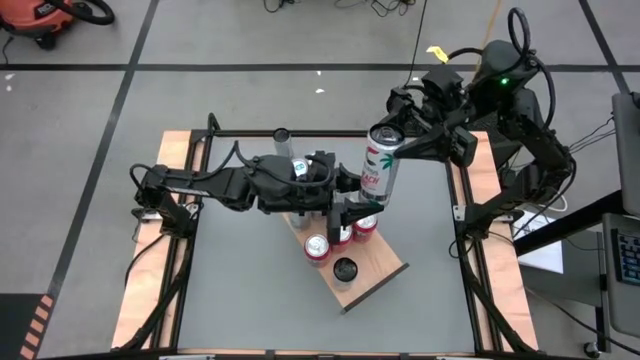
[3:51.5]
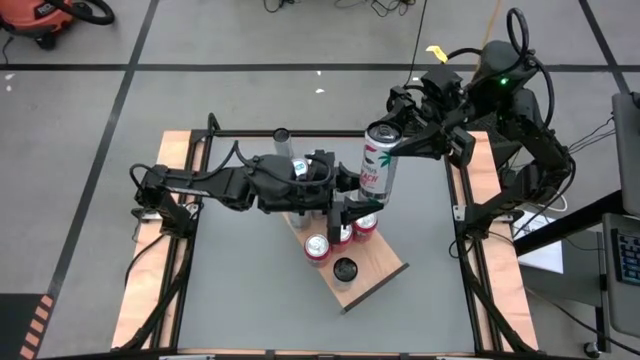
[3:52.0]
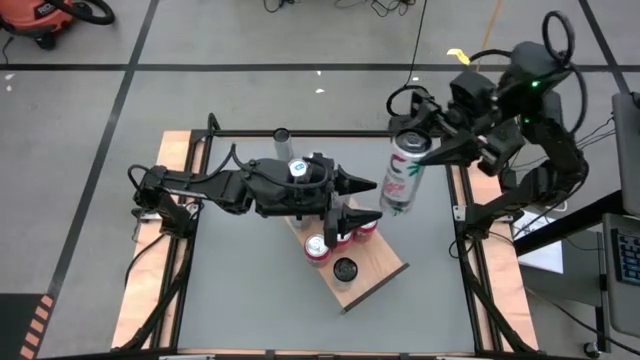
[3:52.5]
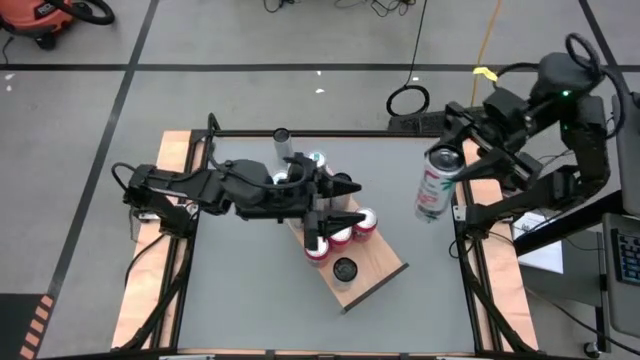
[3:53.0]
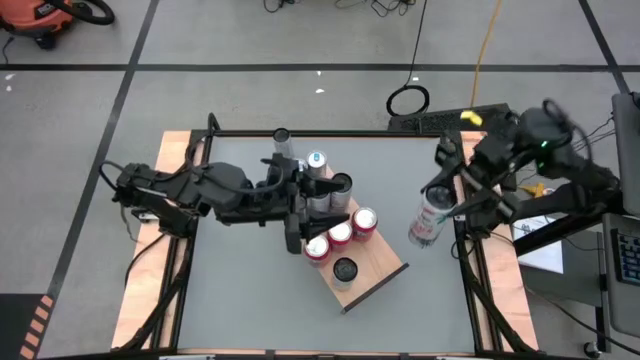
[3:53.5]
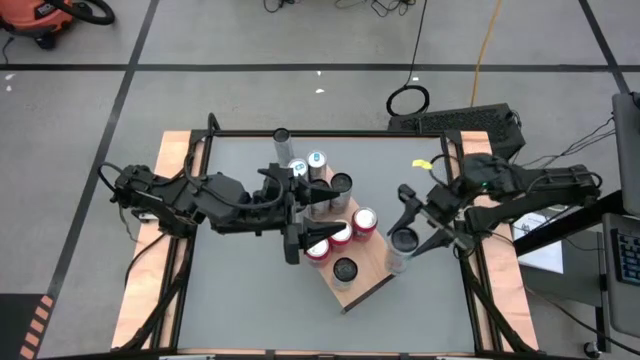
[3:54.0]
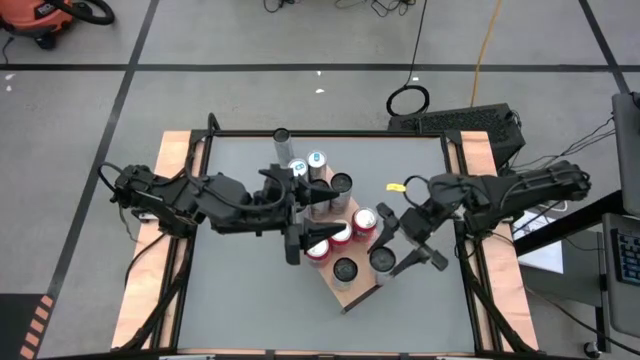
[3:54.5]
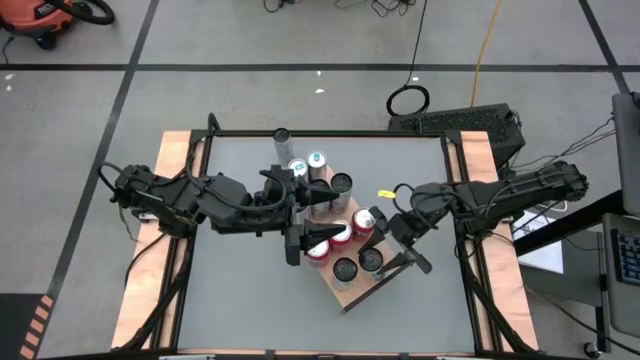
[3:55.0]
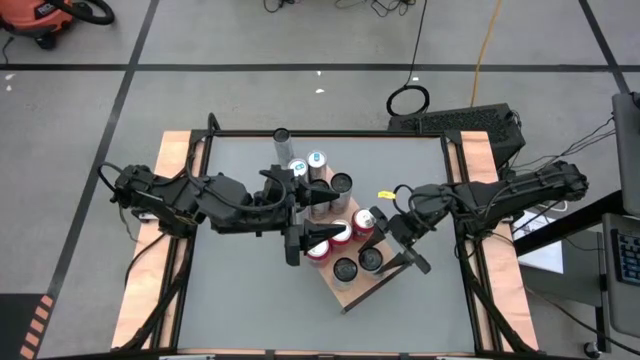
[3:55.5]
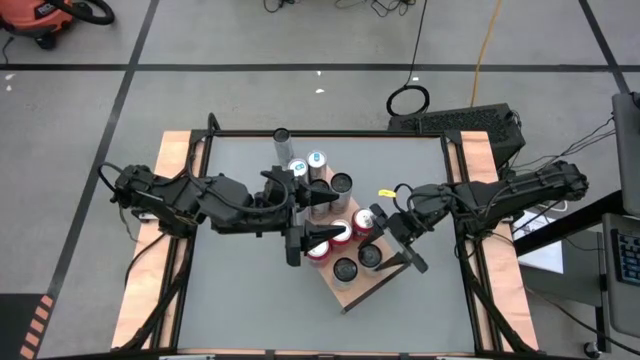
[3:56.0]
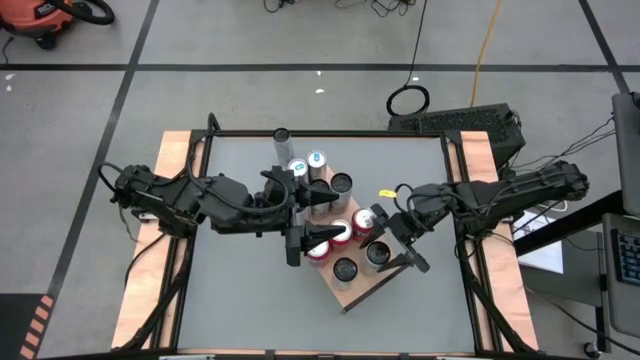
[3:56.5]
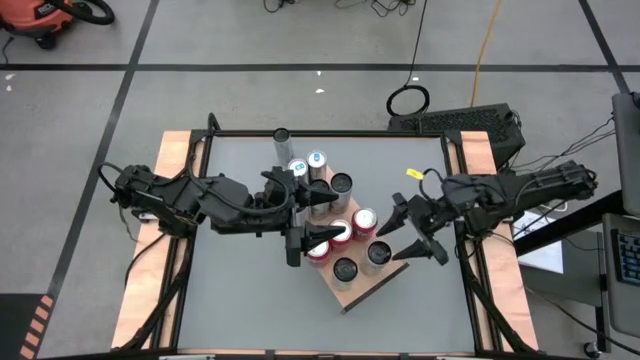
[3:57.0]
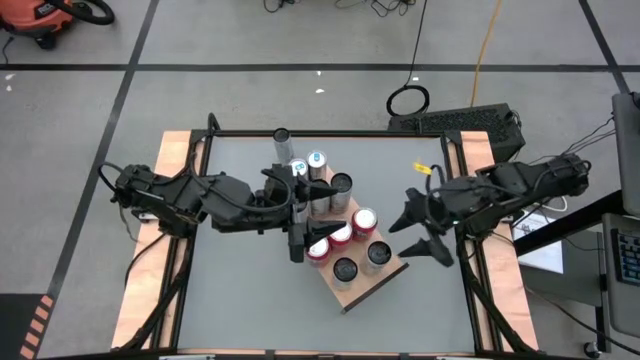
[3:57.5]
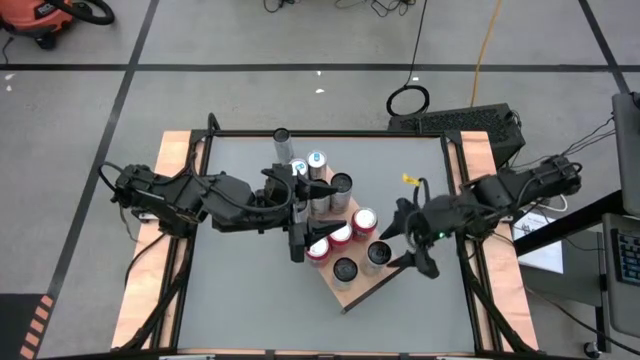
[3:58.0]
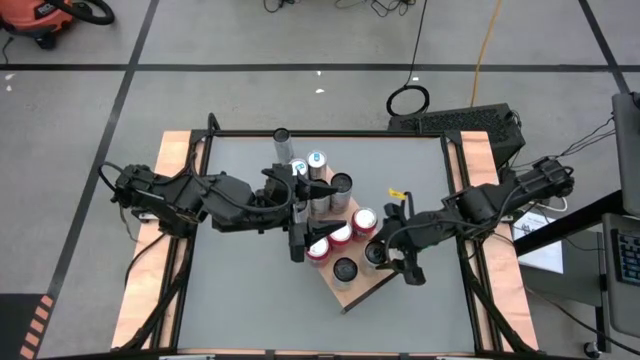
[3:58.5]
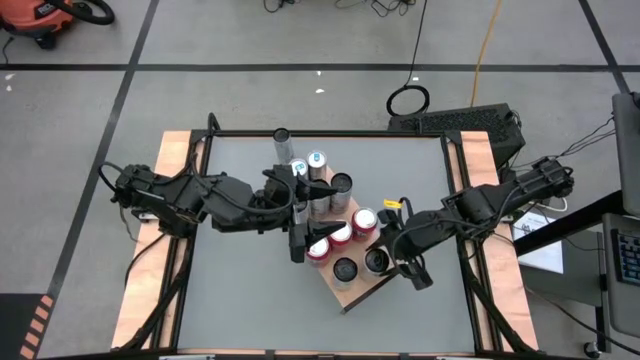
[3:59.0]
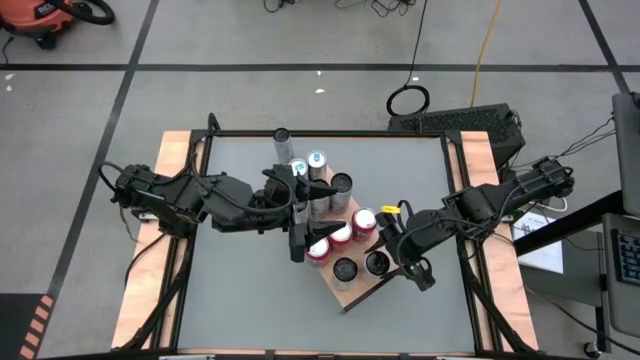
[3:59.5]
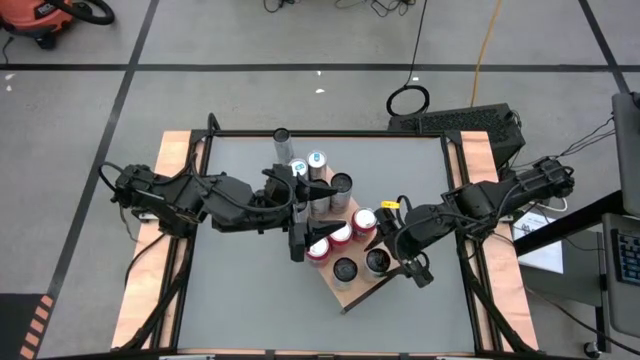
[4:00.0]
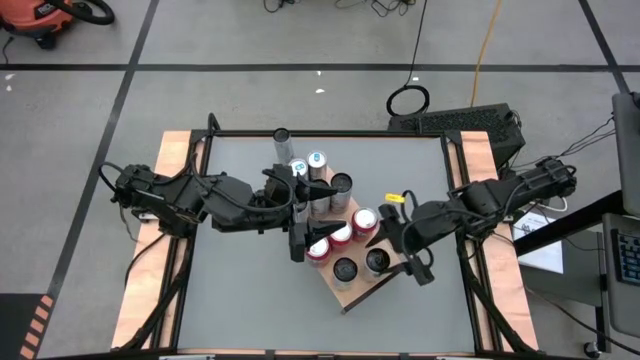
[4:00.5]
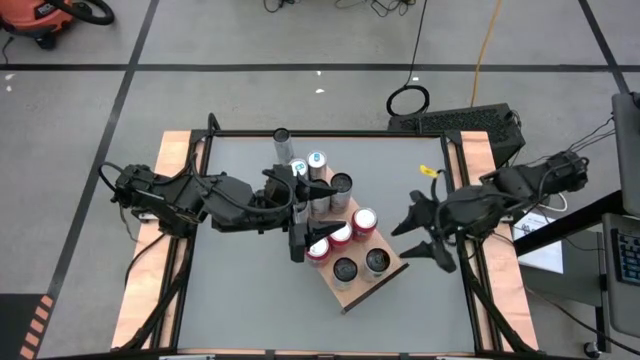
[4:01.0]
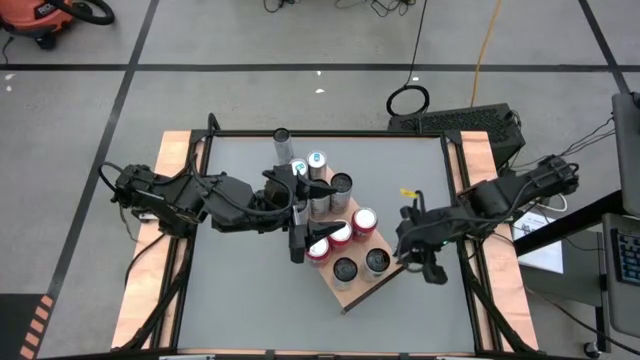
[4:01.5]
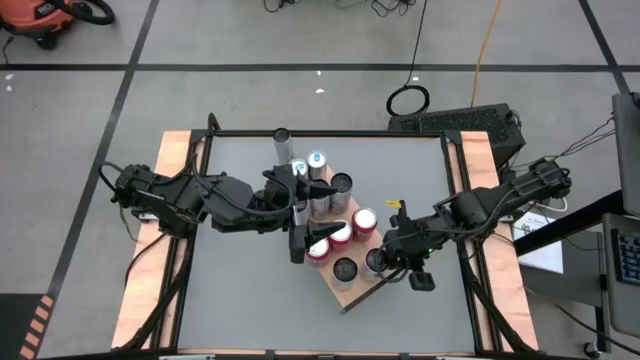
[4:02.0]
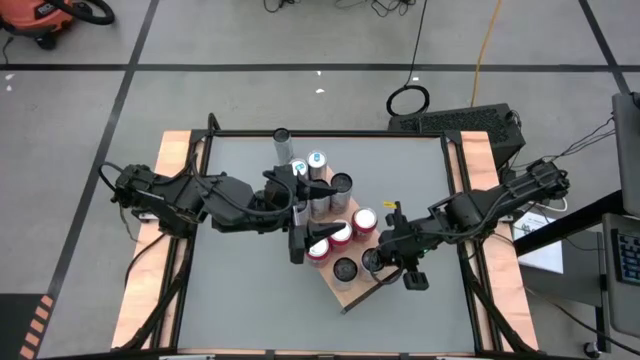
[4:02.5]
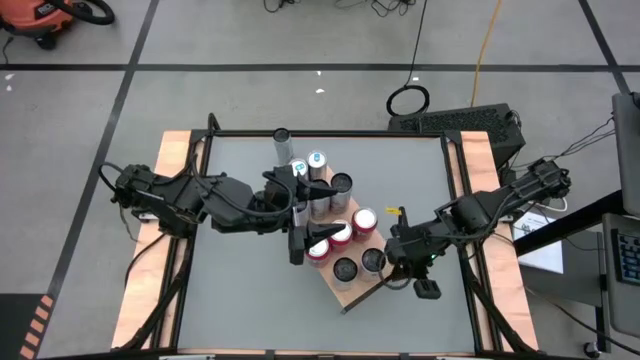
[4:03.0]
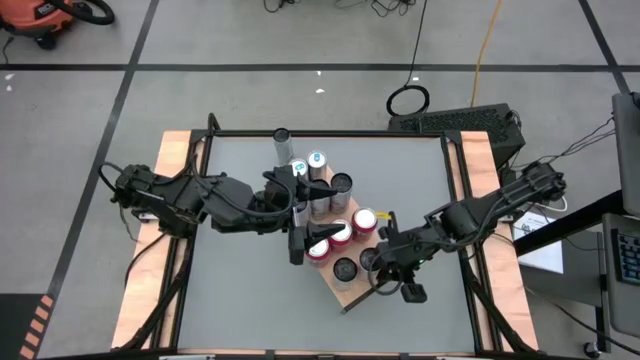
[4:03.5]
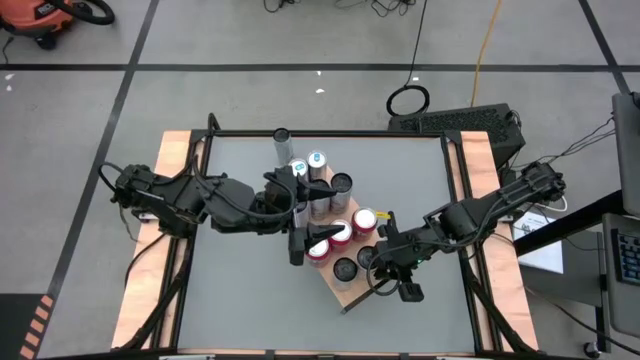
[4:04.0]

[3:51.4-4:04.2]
Task: Place canned beverage on shelf
Put the bottom red soda can on the shelf aligned with the other red soda can

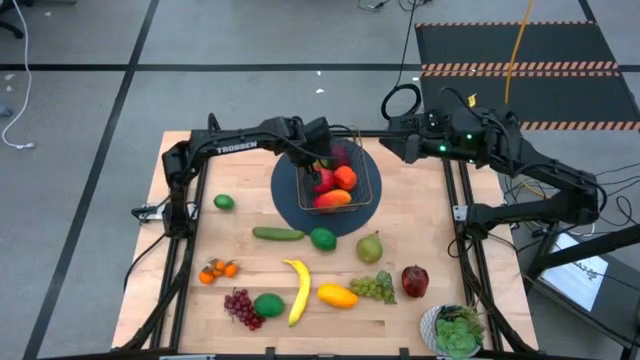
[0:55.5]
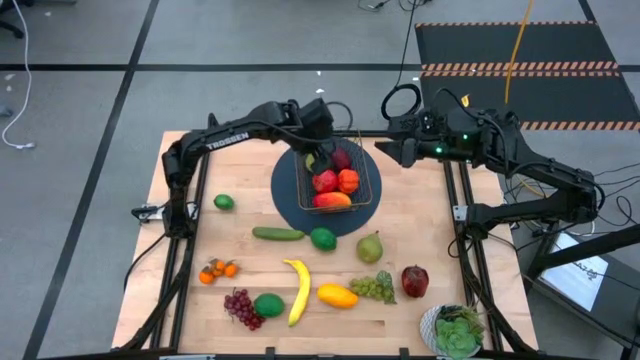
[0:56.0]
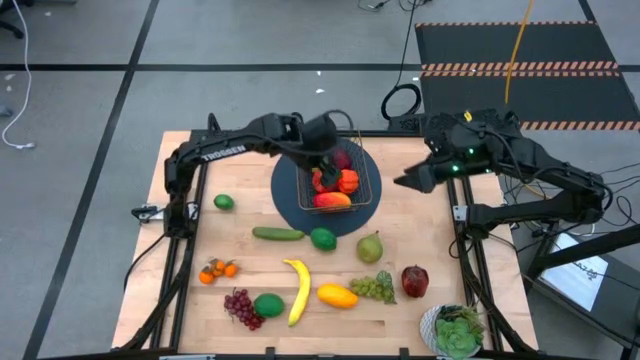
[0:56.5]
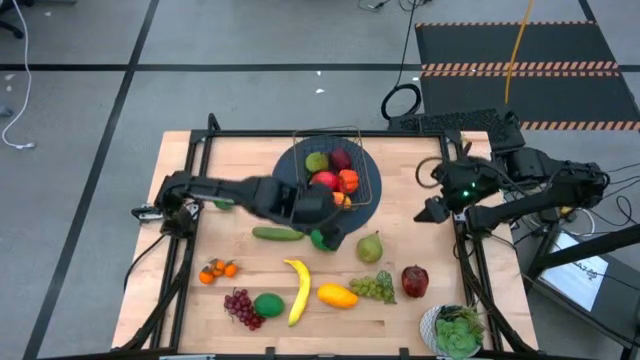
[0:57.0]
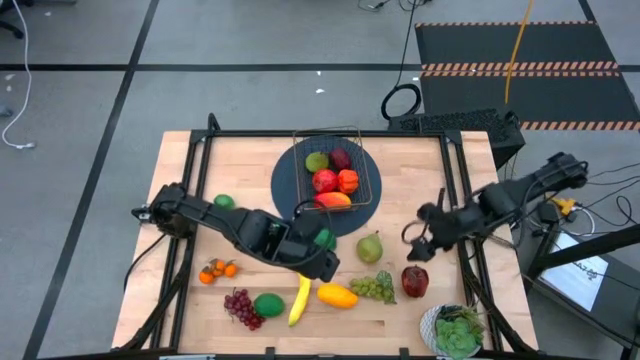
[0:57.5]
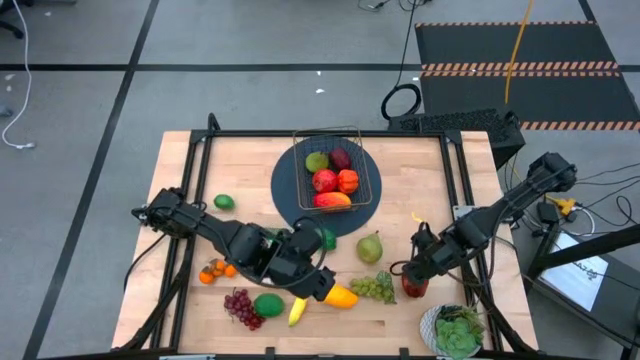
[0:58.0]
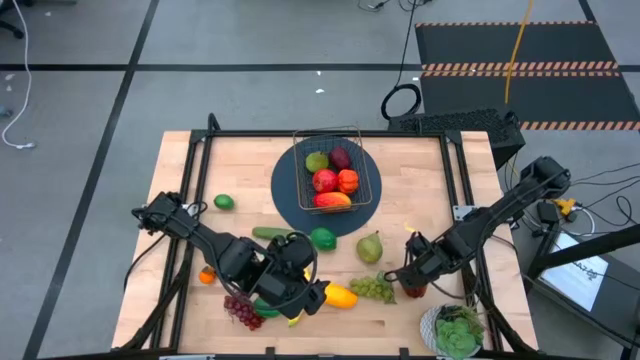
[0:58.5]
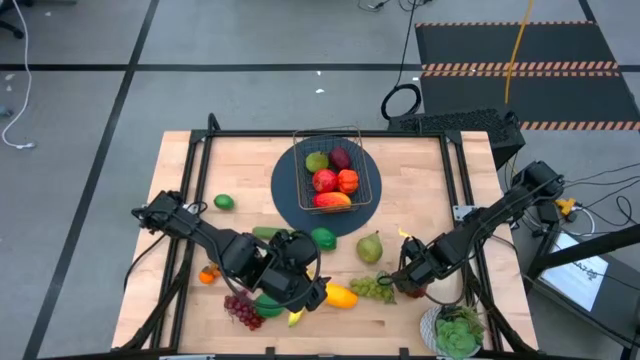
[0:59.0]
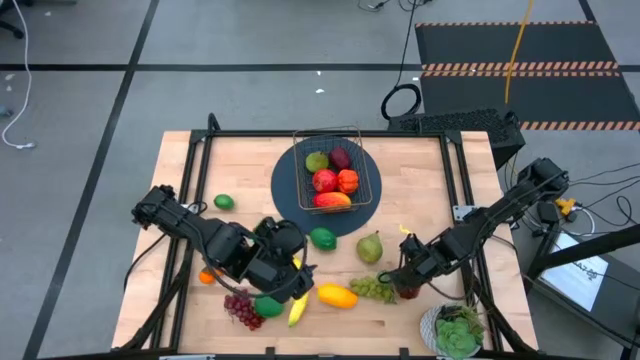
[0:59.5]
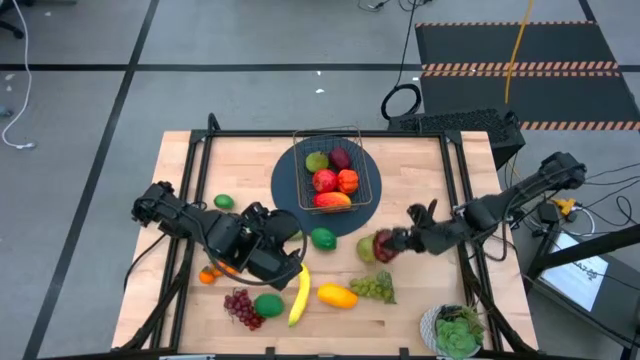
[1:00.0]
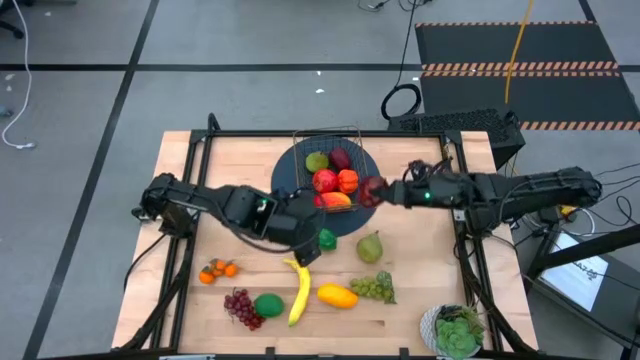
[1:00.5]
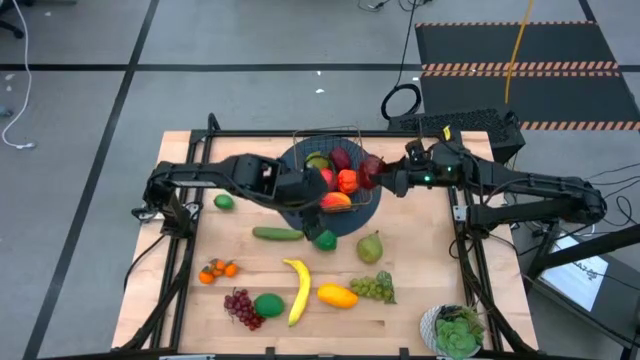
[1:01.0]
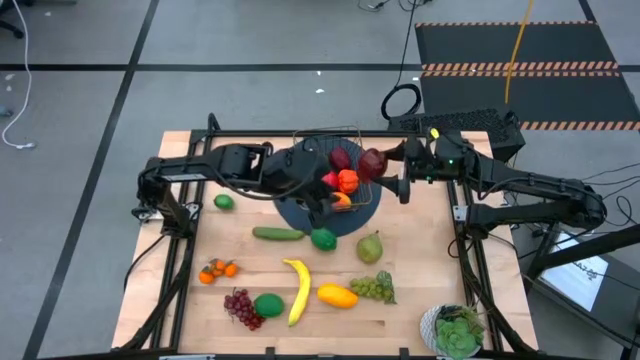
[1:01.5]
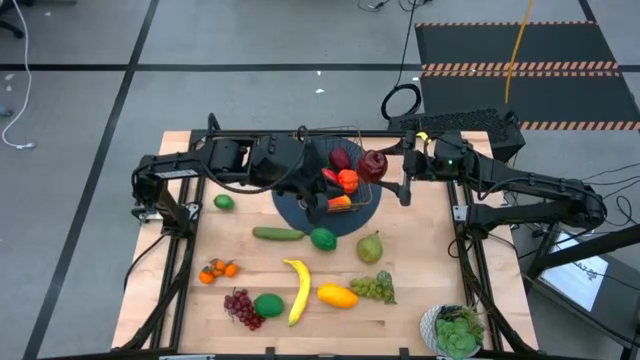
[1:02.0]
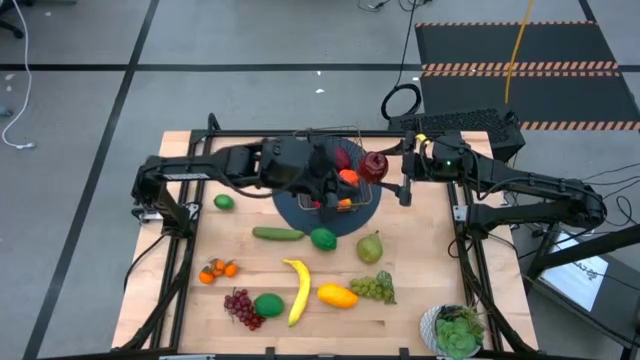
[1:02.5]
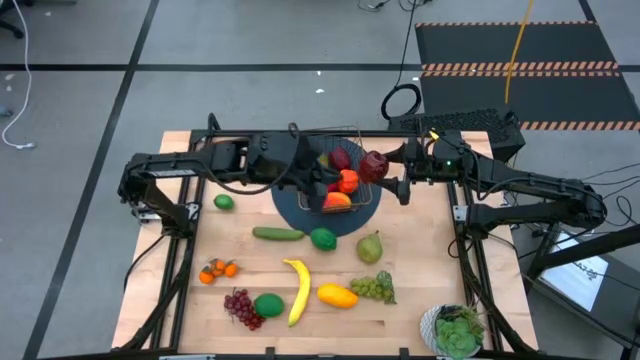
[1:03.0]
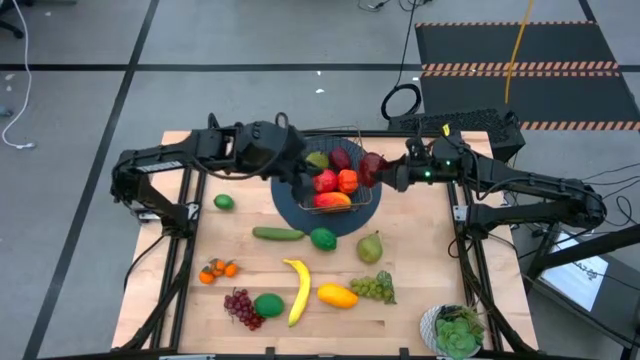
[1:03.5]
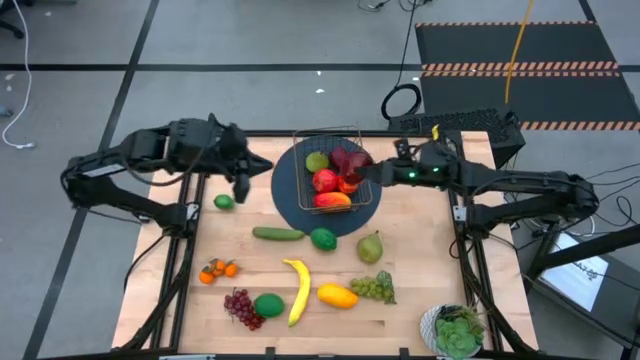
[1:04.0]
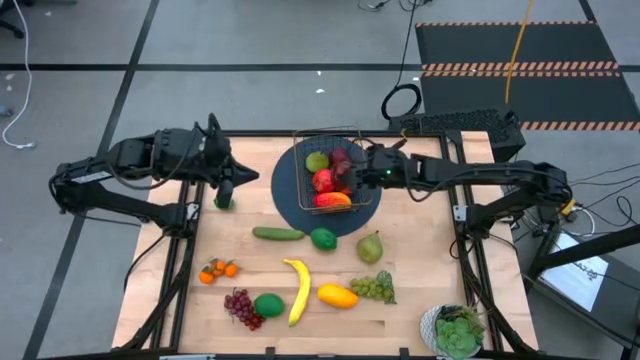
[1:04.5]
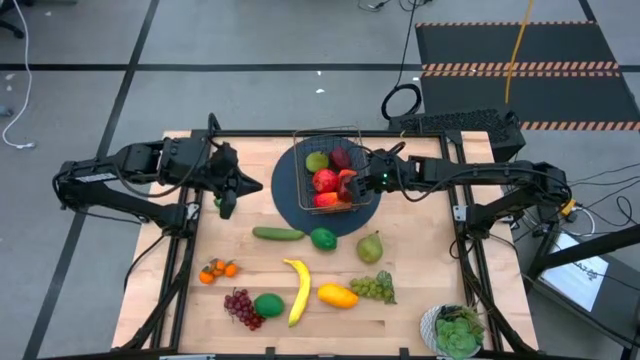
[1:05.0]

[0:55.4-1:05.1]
Task: Build produce basket
Put the dark red apple into the gold wire basket
